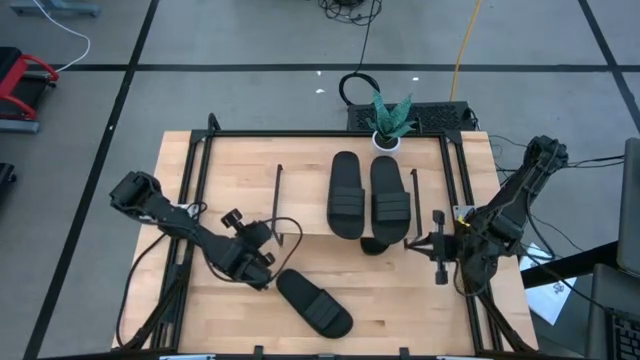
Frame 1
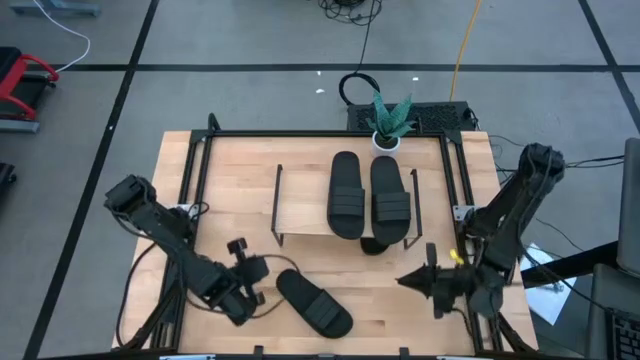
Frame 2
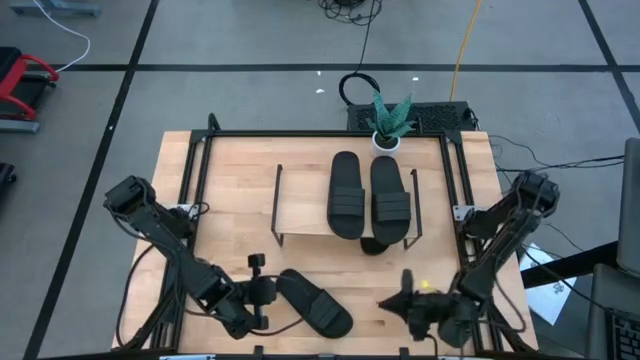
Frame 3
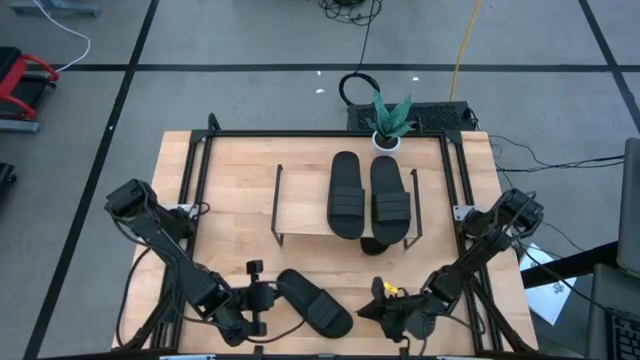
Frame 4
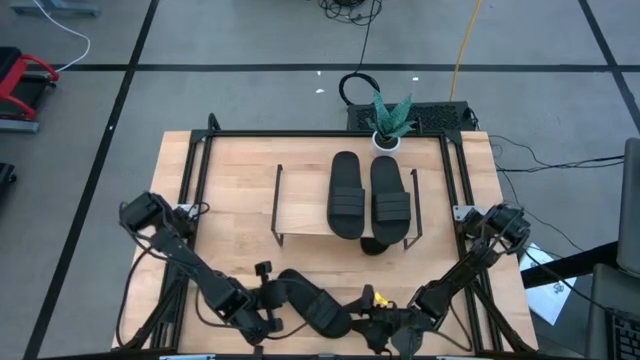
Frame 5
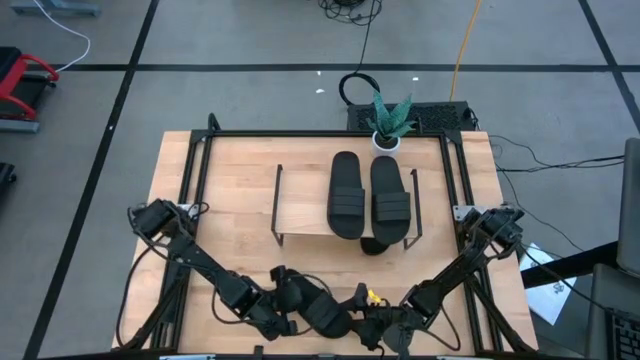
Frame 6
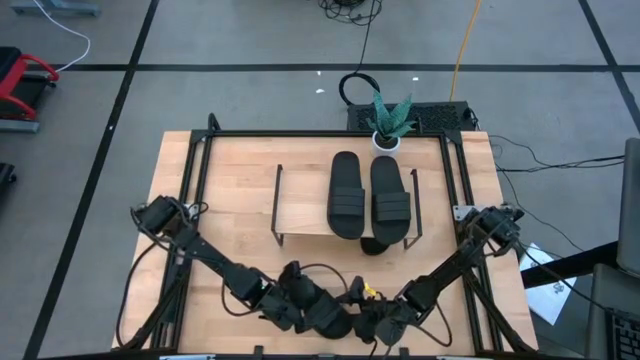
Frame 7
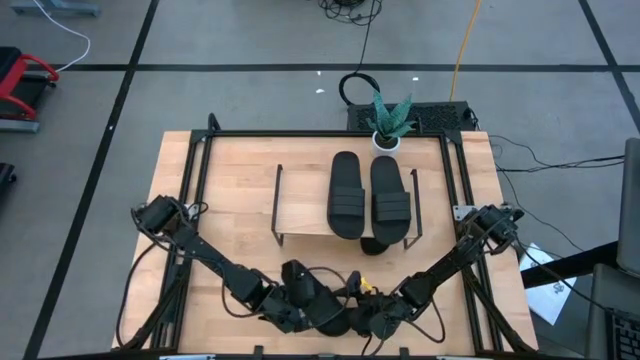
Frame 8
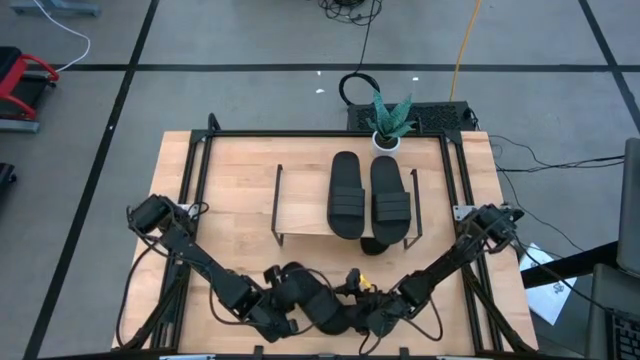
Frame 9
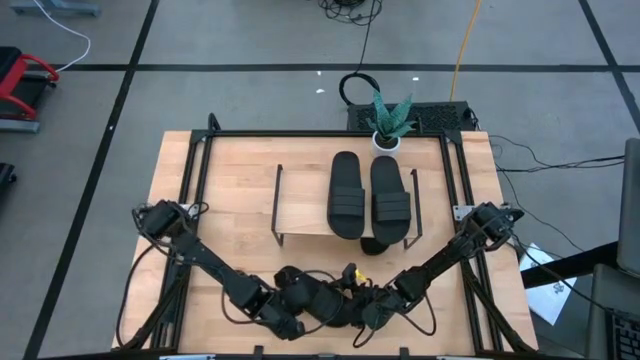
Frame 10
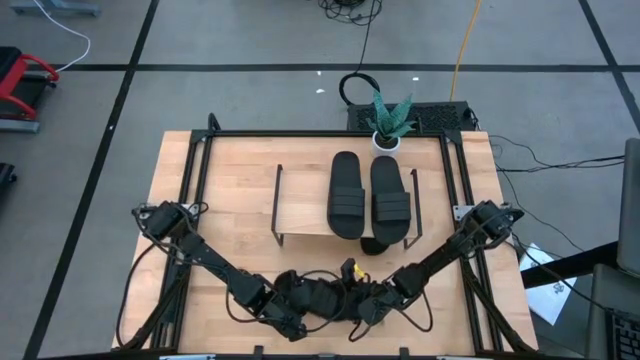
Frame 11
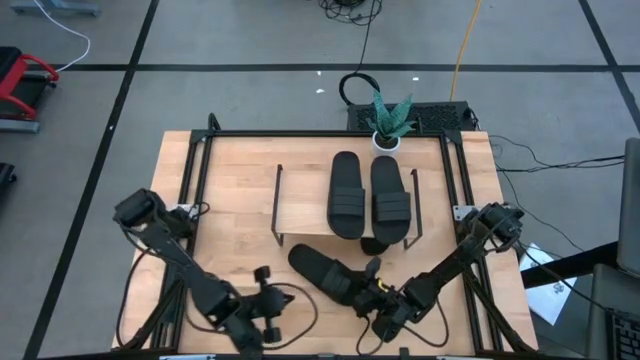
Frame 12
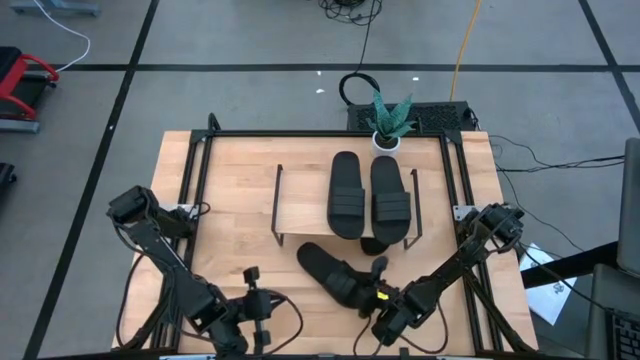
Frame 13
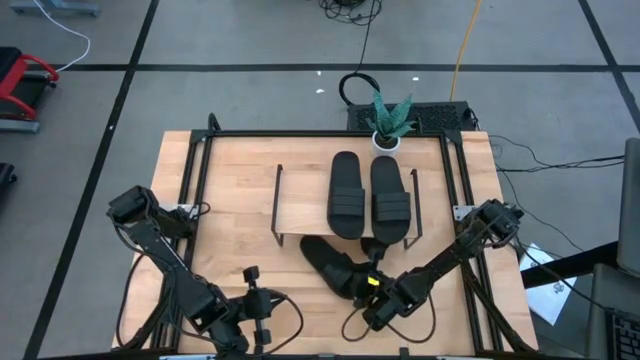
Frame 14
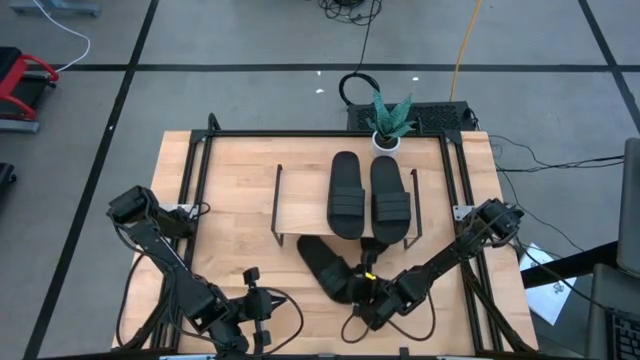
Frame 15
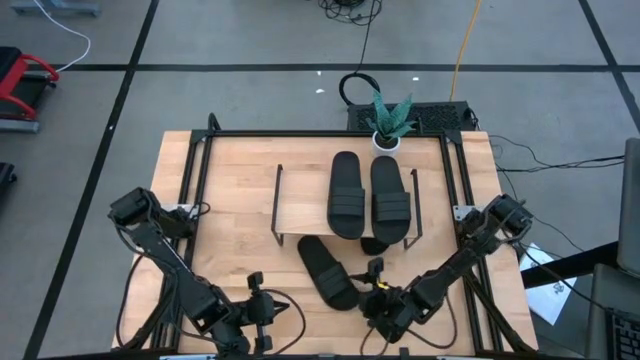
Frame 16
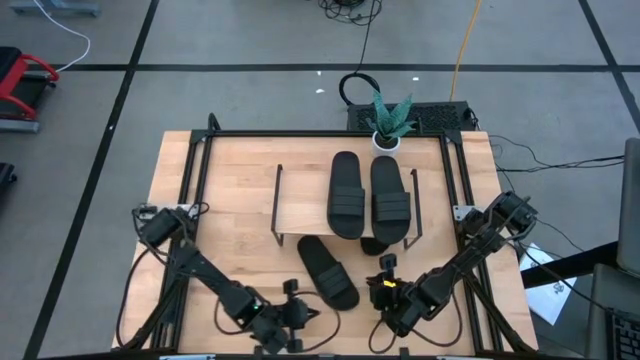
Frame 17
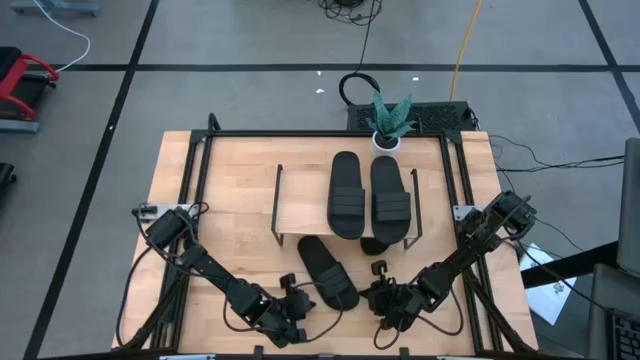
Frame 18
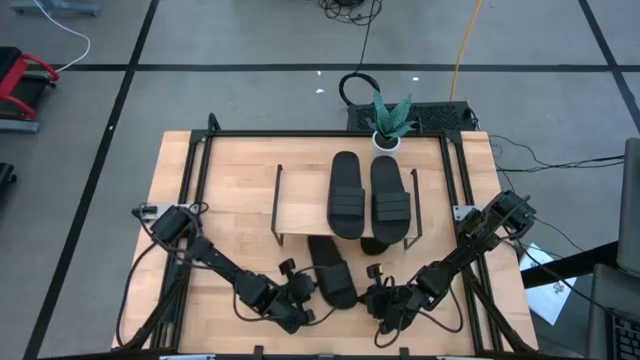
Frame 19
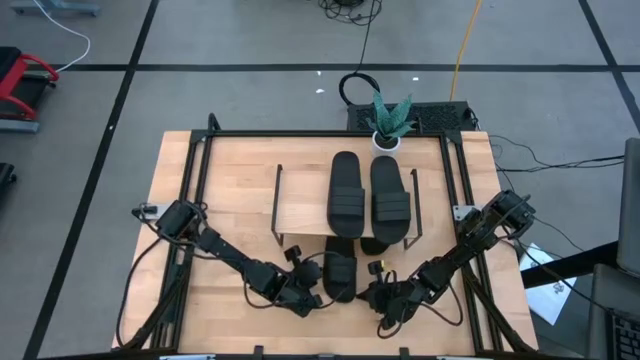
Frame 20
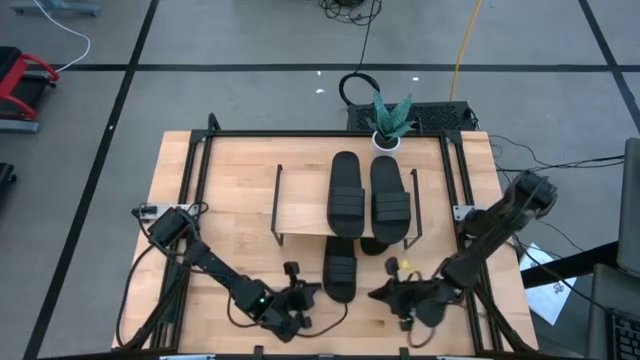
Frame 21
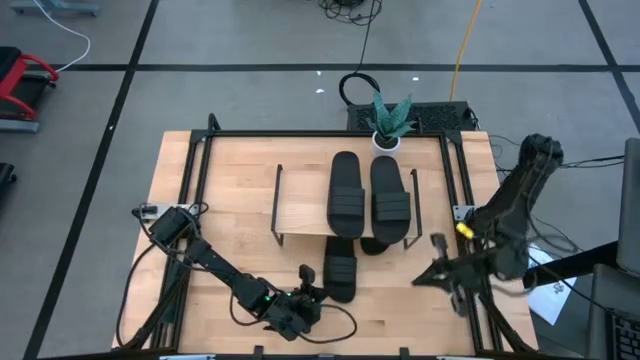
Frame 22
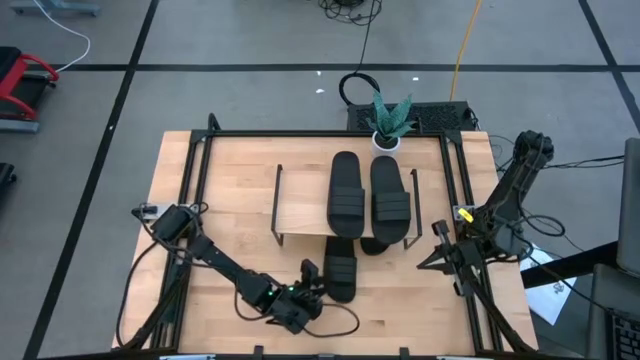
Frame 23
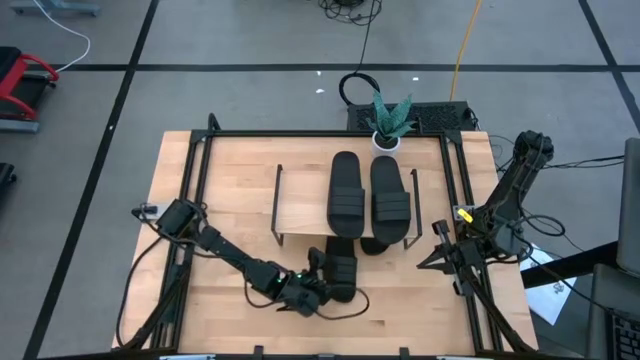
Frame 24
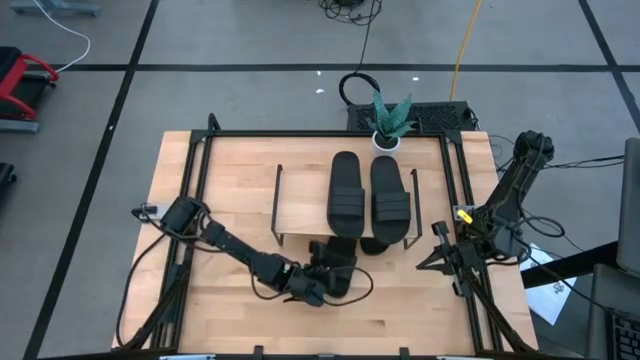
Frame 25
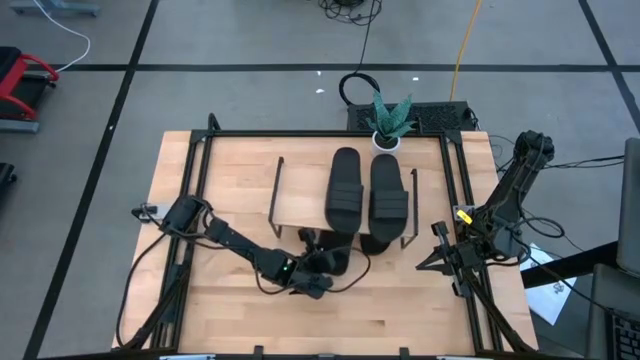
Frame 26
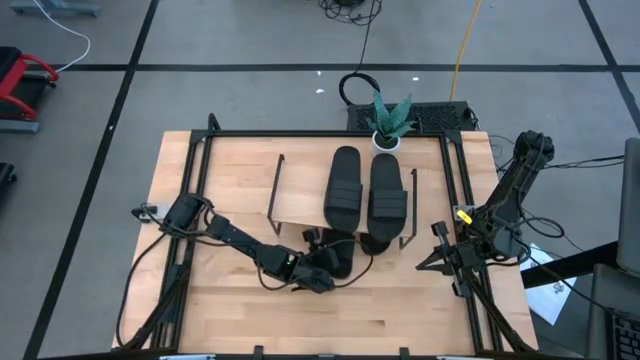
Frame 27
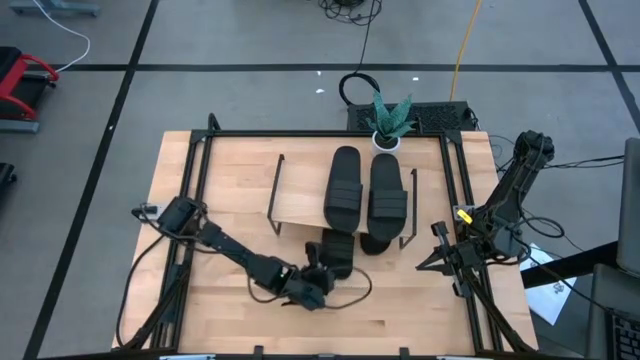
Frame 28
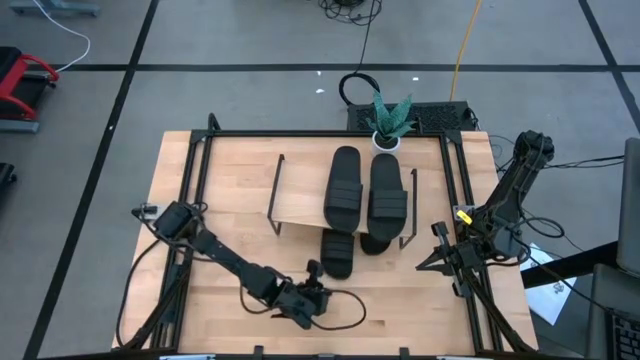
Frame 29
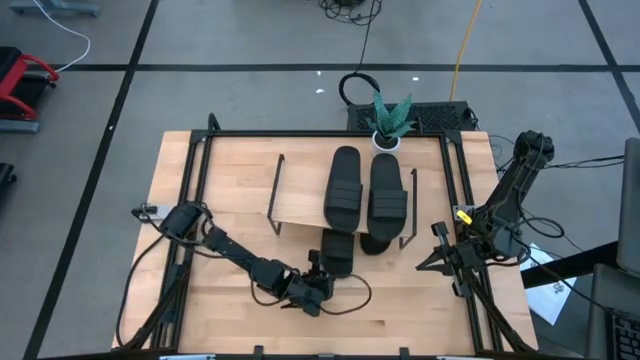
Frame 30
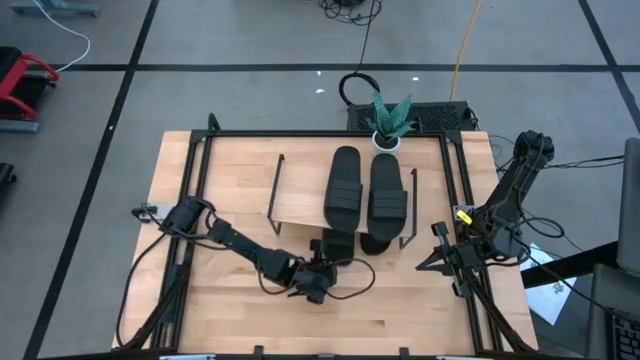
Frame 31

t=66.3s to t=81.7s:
Task: Pick and place slides into the shelf
Put the black slipper under the shelf

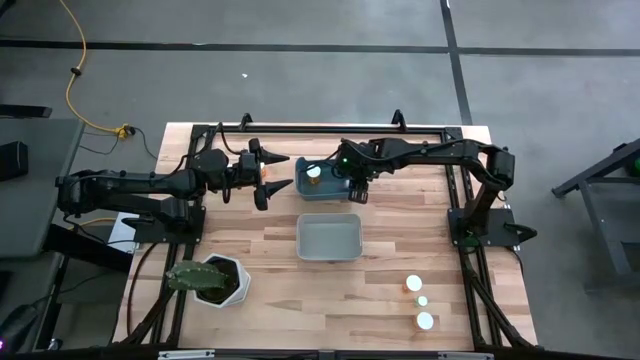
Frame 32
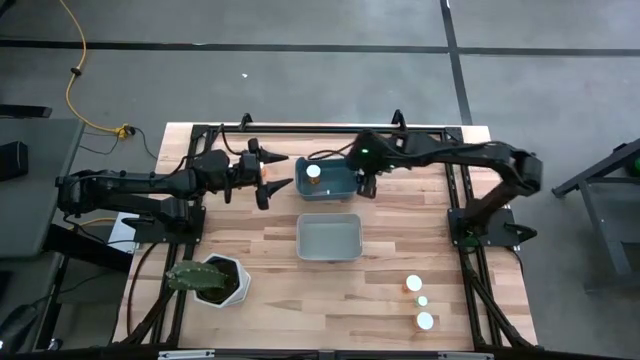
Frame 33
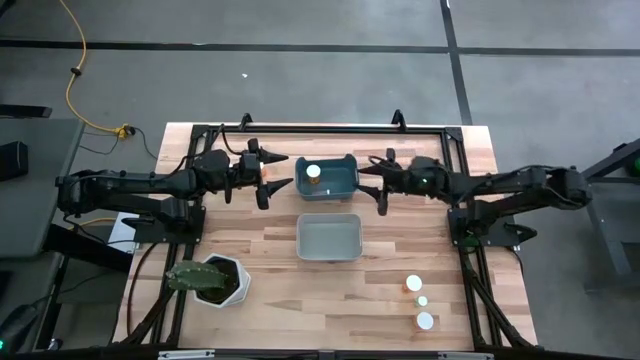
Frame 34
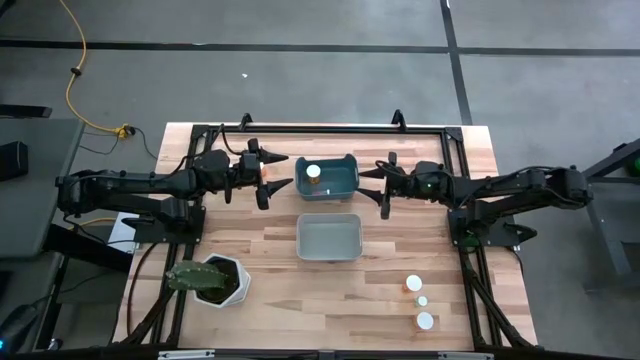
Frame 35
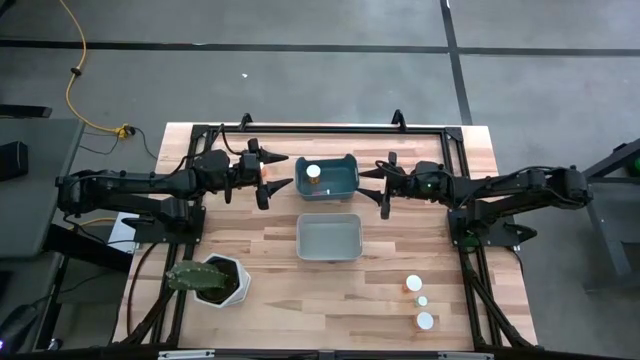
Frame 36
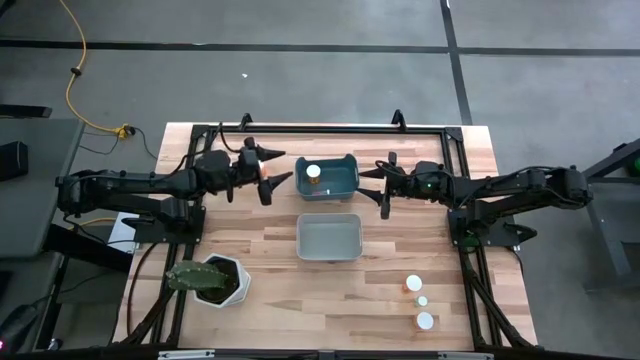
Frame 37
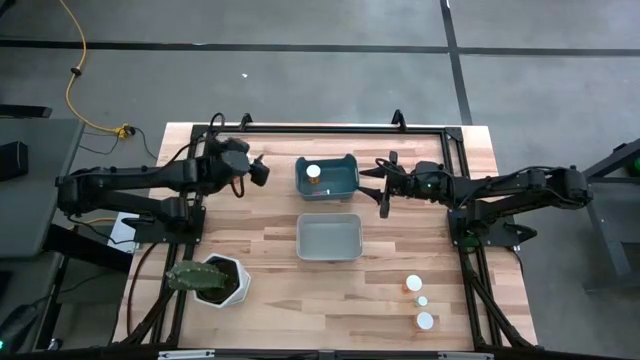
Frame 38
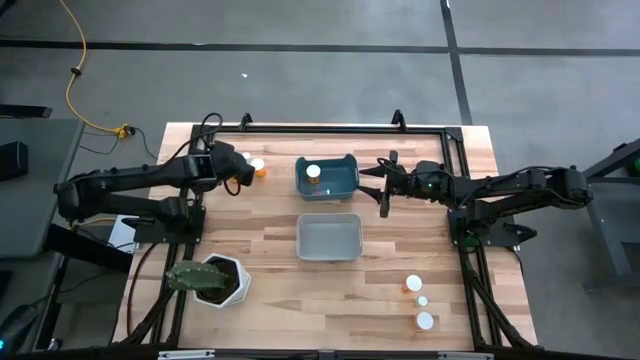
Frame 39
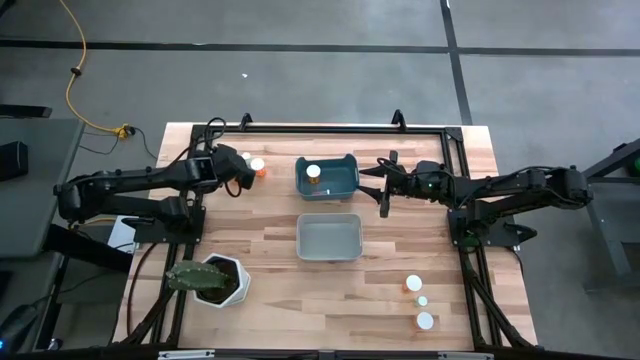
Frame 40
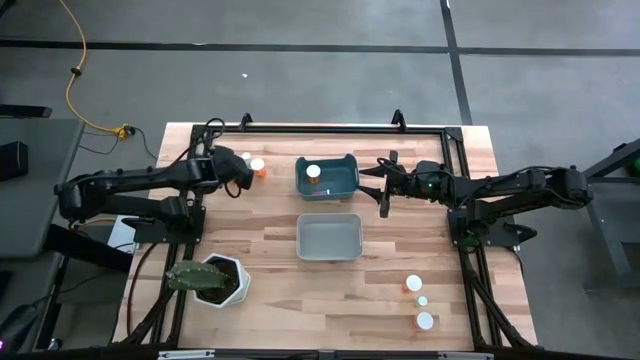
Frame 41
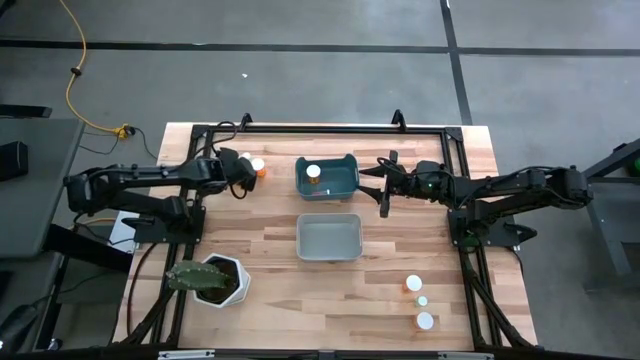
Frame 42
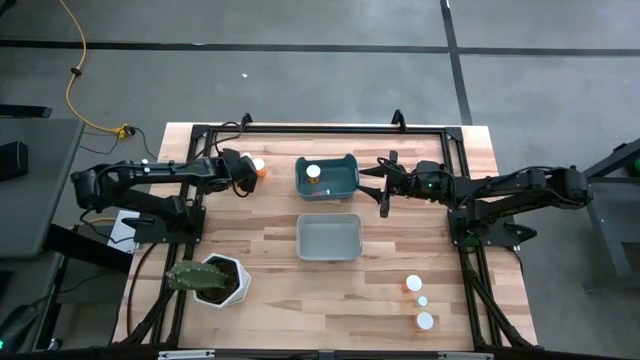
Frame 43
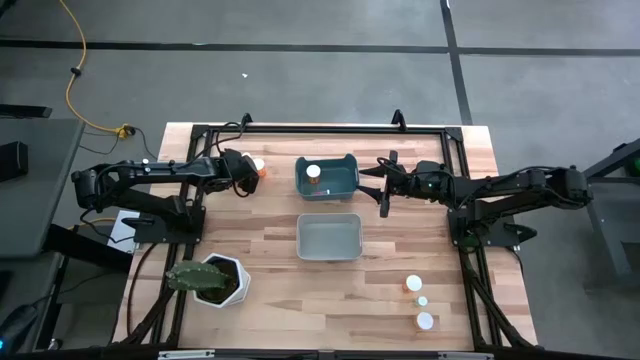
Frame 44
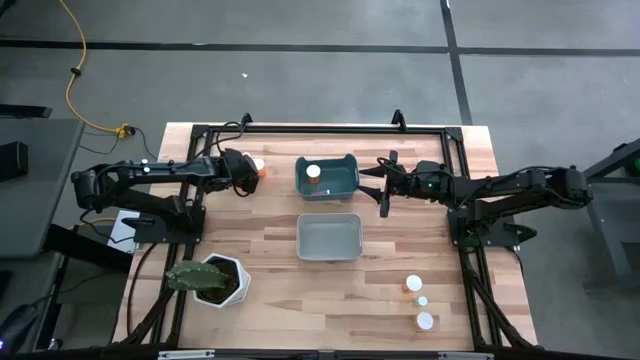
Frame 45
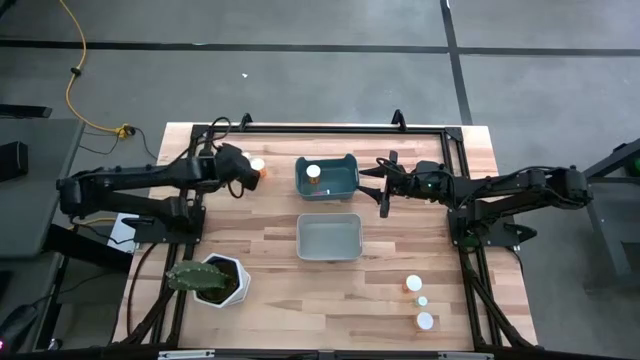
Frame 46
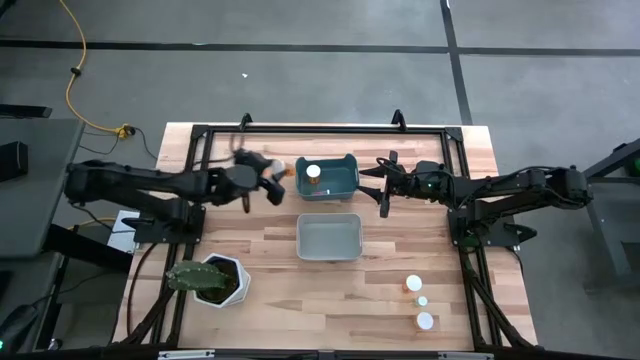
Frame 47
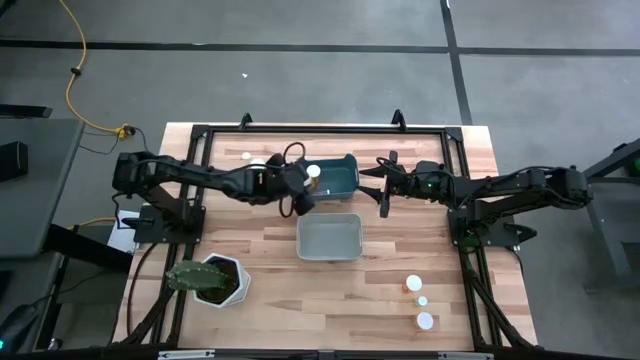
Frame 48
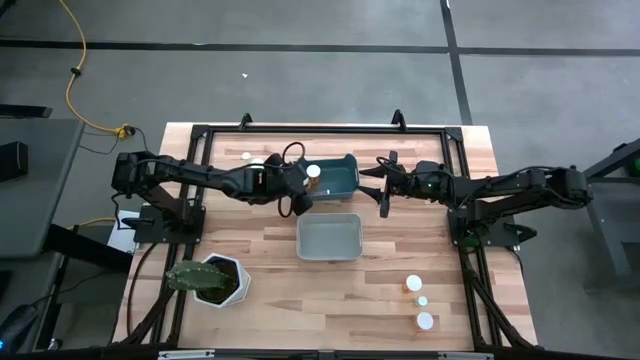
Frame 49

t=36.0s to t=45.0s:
Task: Pick and place medicine bottles into bin by pill shape (circle, oval)
Put the orange capsule bottle into the blue bin
